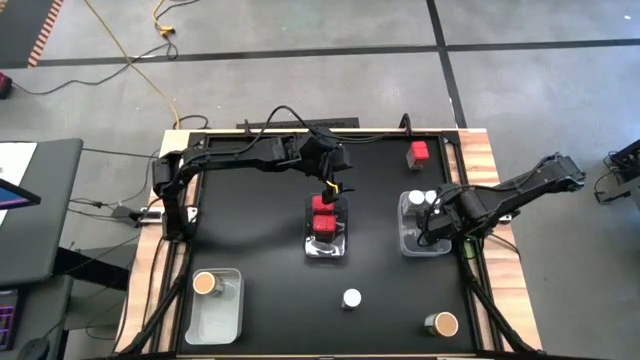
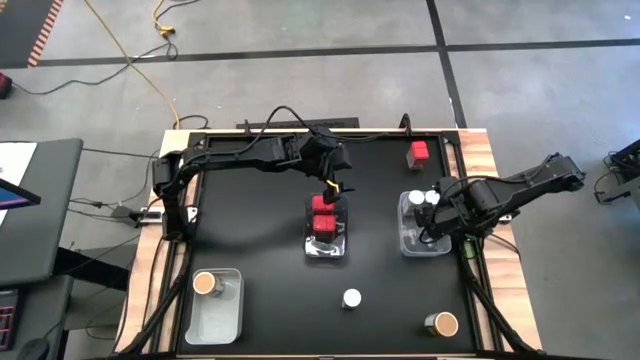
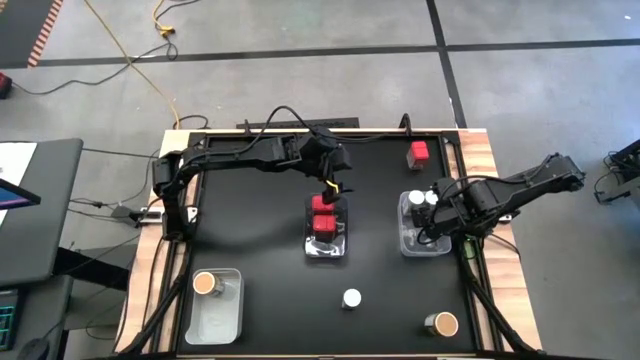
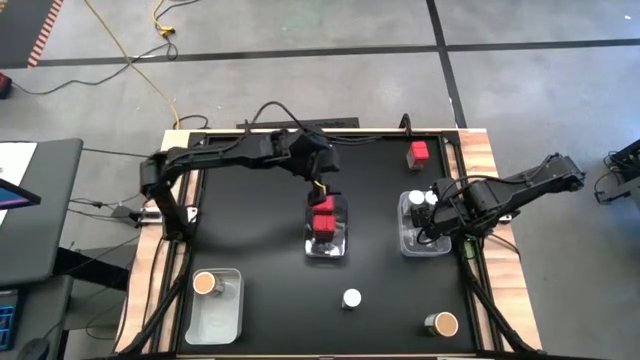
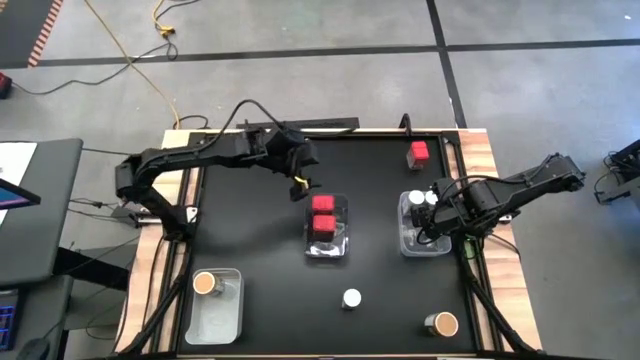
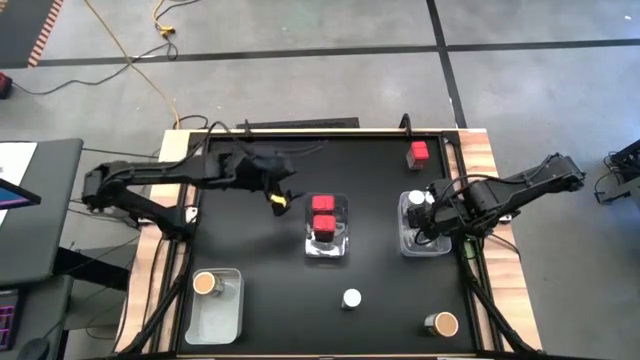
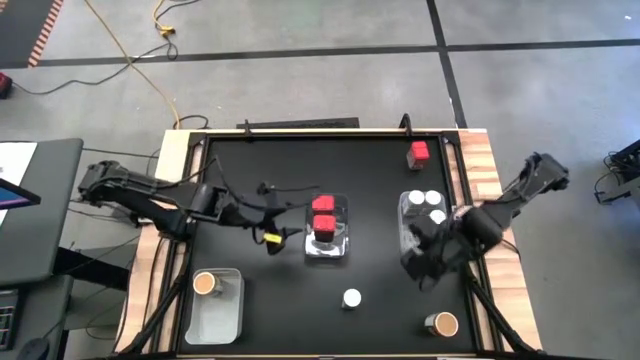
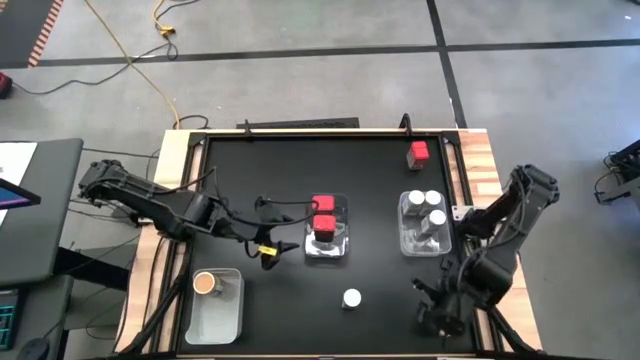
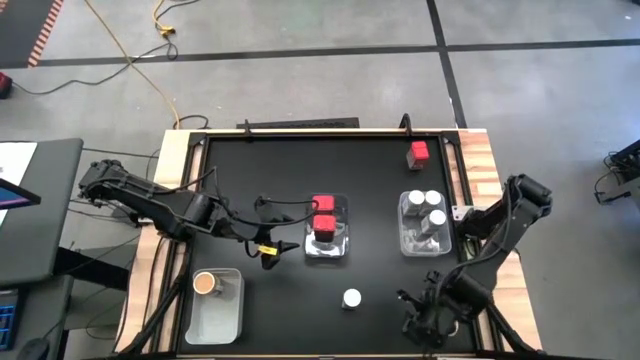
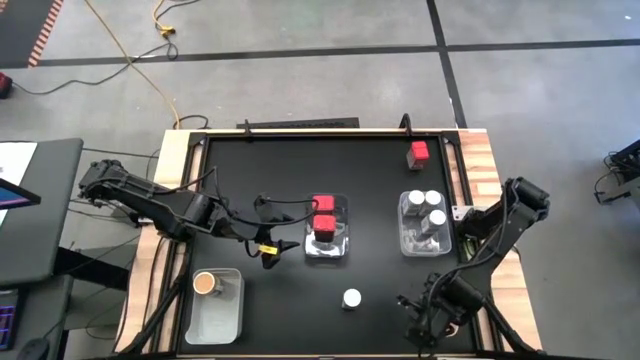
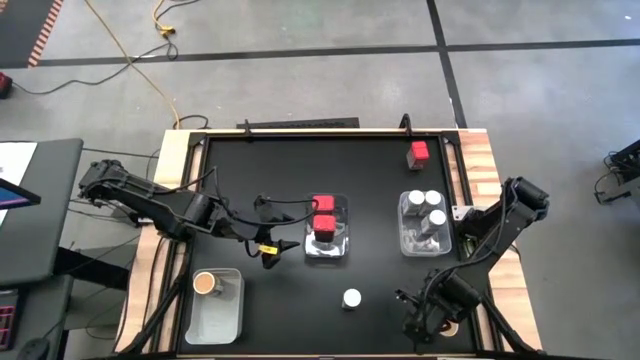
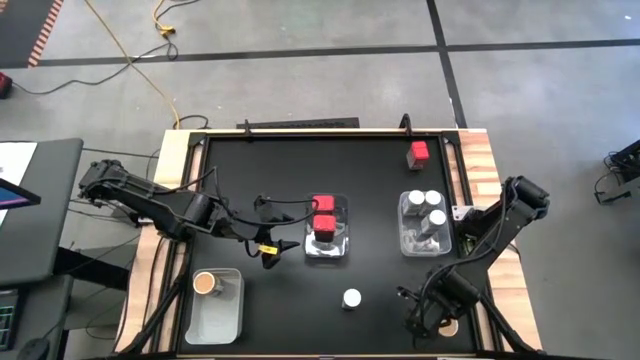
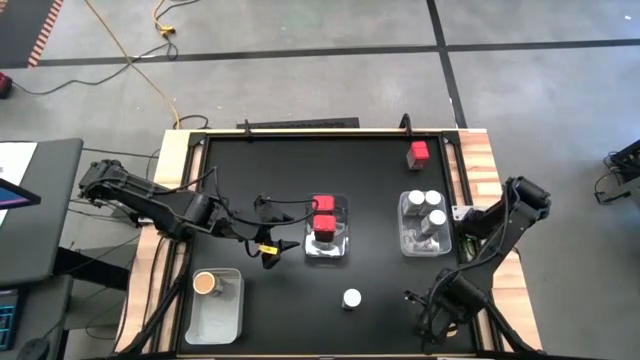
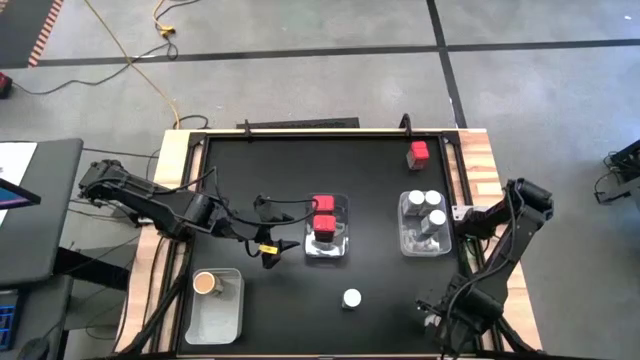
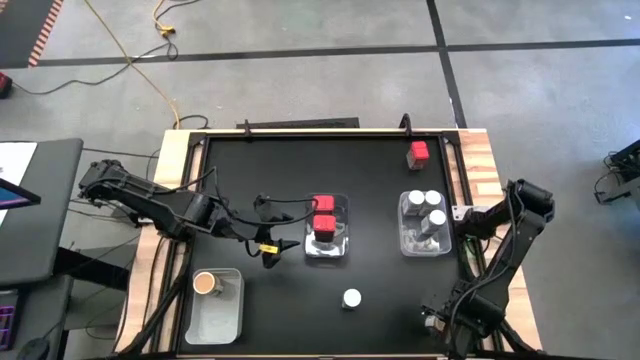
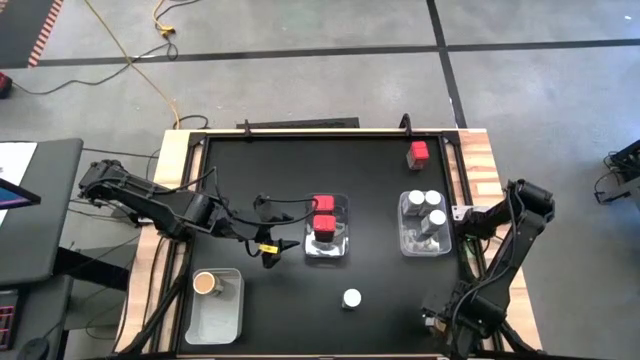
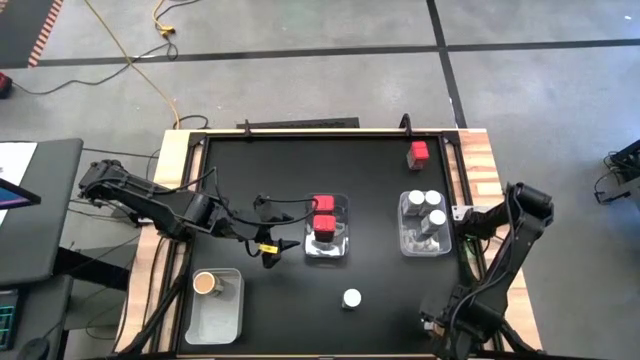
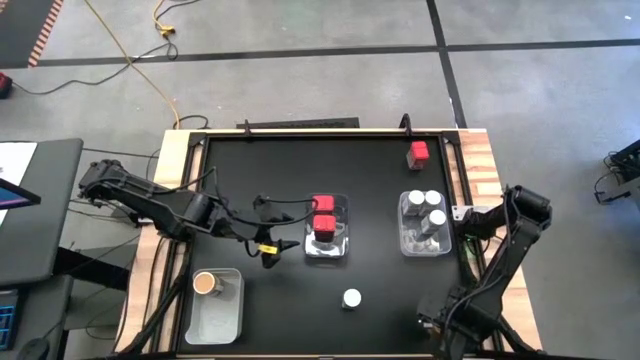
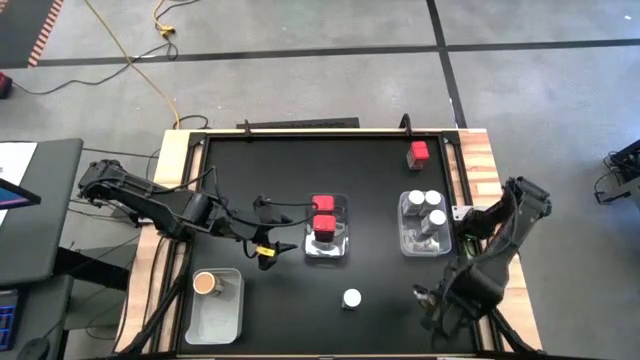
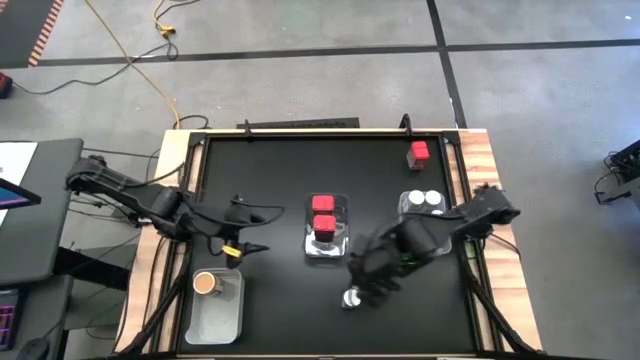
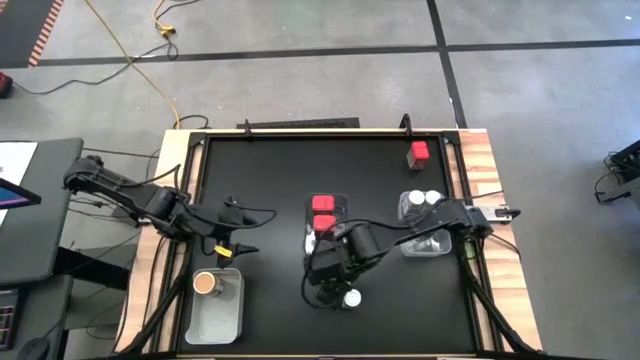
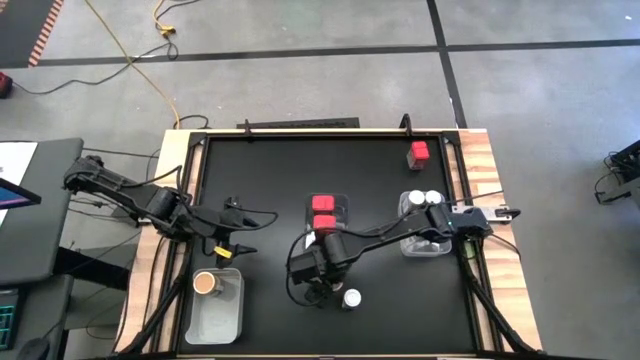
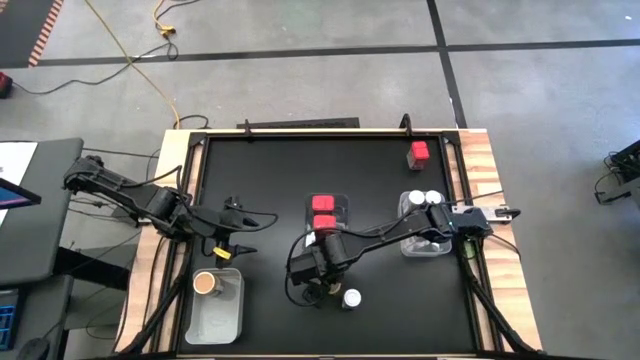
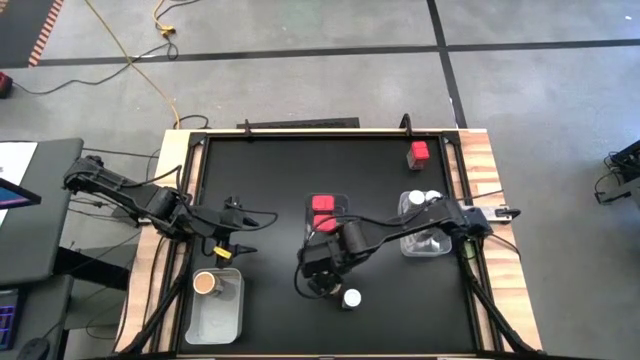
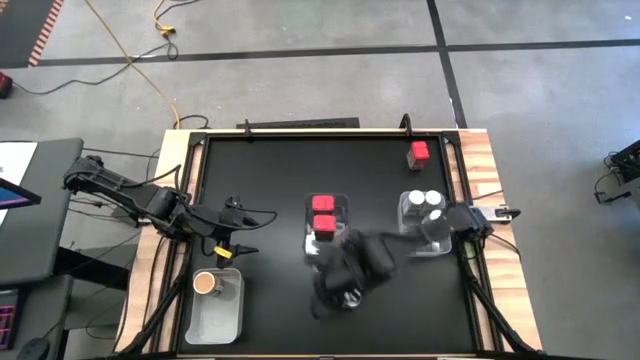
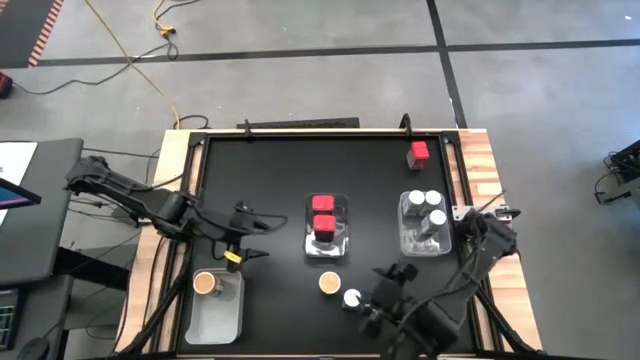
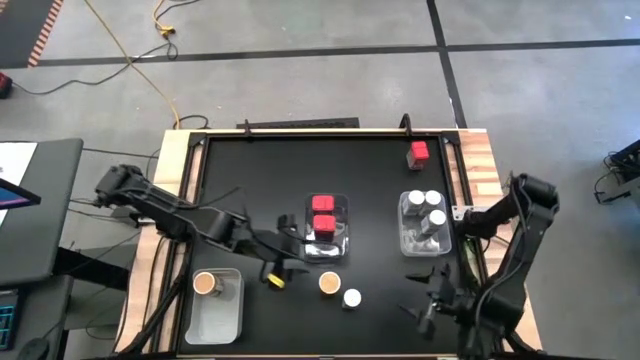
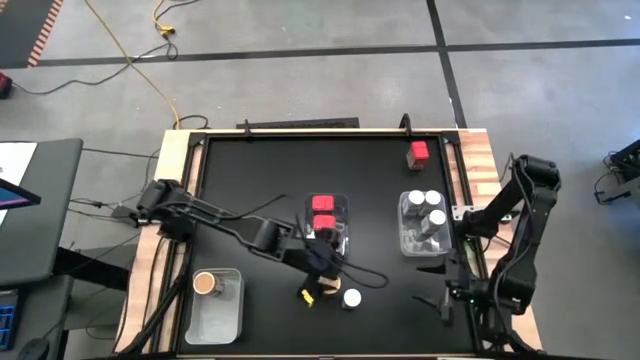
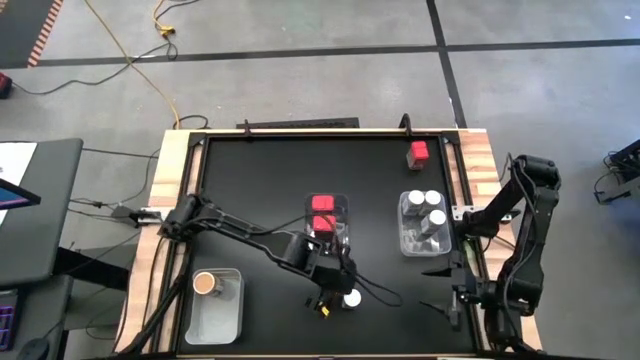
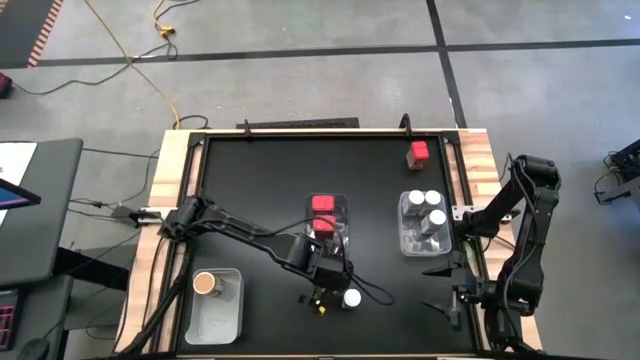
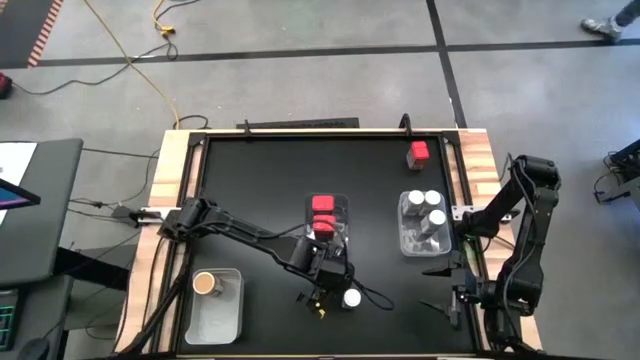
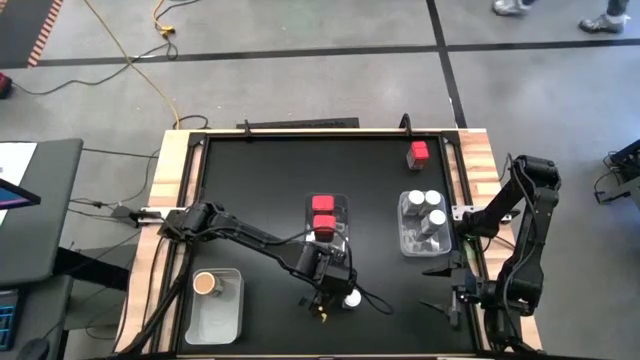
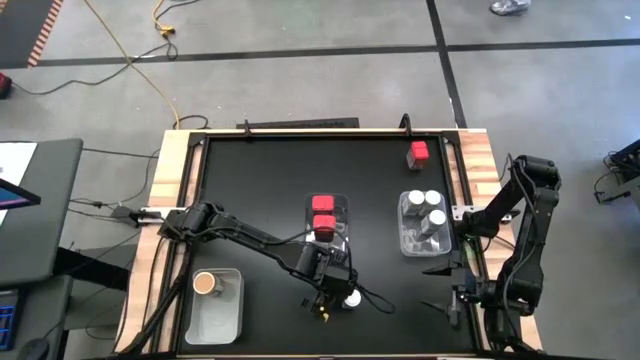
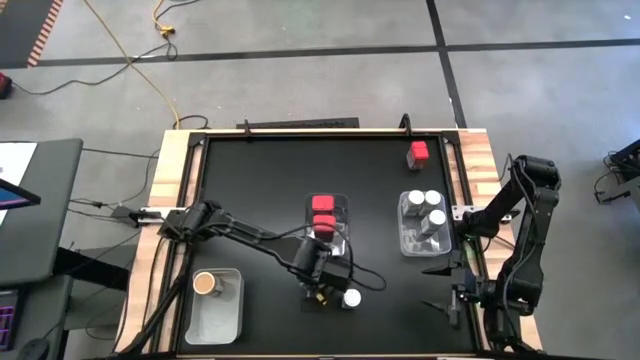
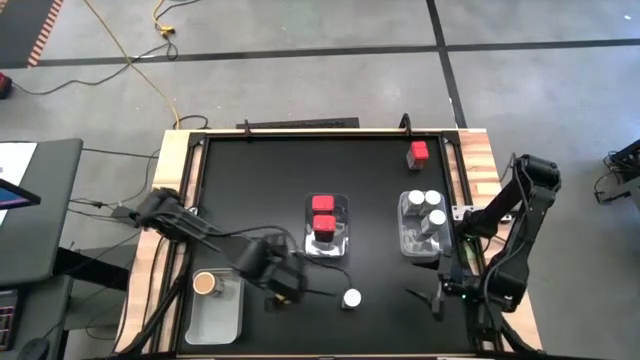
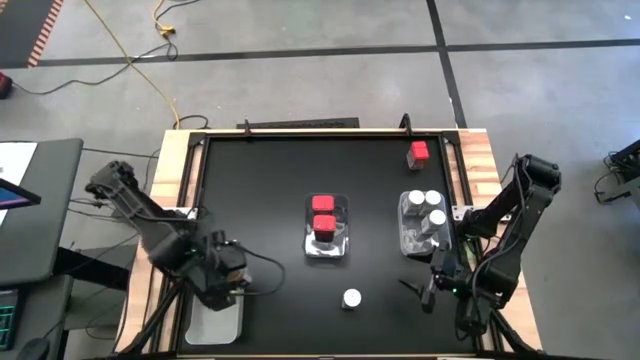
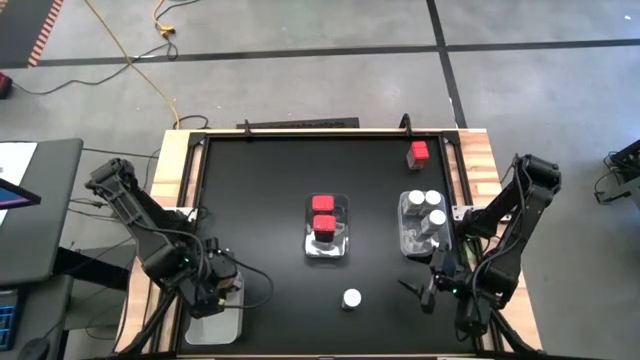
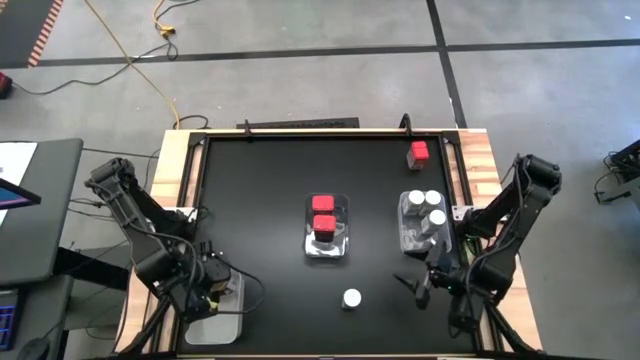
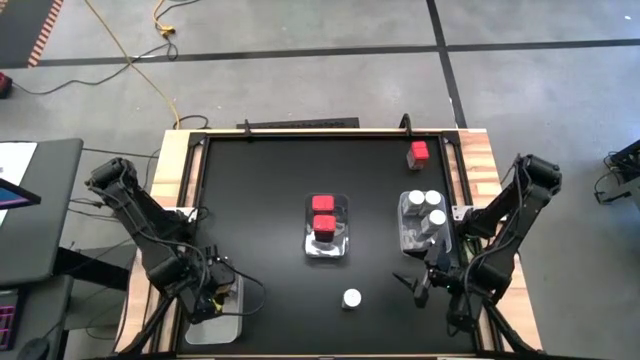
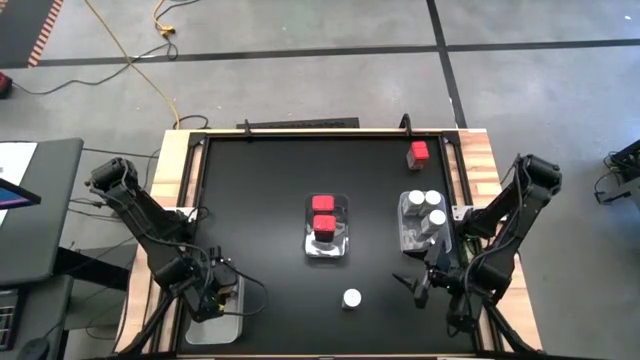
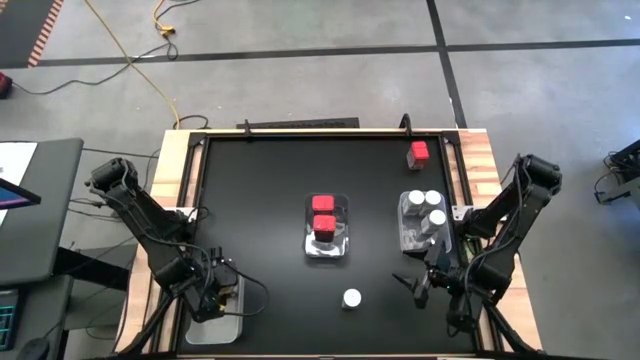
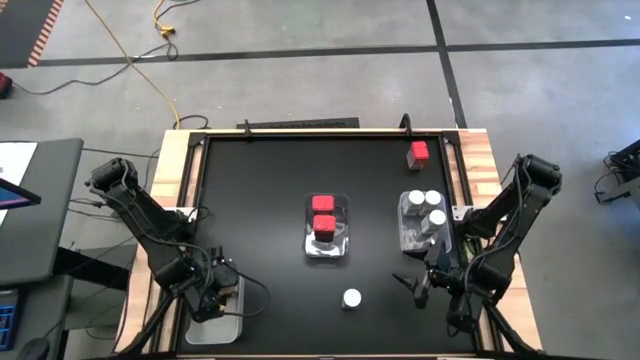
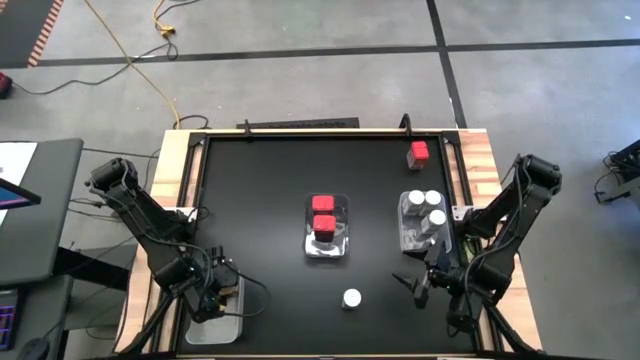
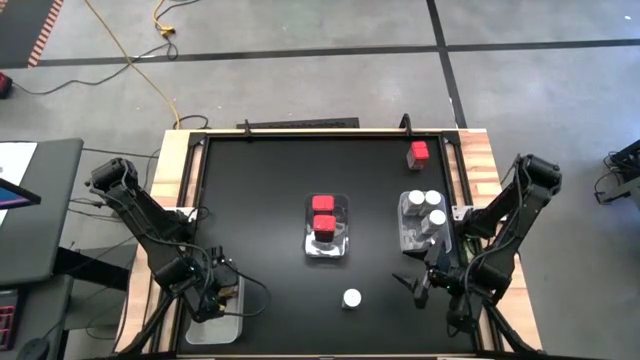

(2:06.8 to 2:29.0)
Task: Sort spices by type
Put the brown seasoning bottle into the gray bin
